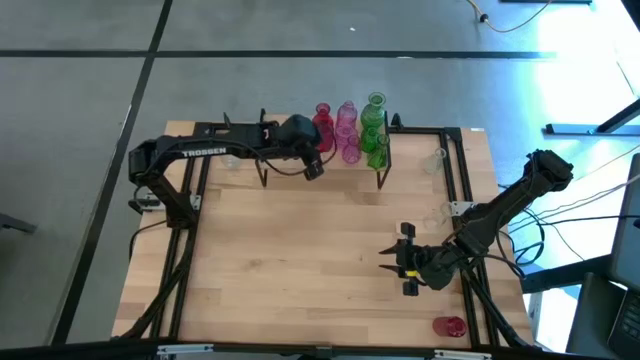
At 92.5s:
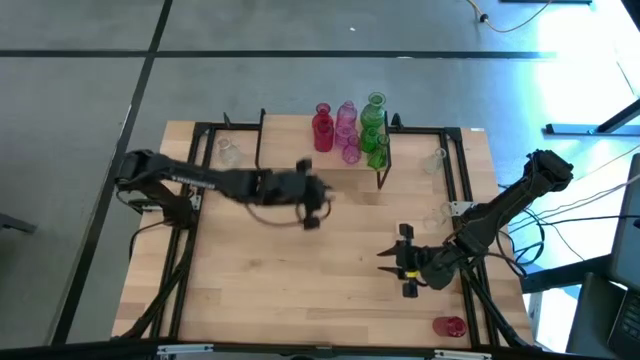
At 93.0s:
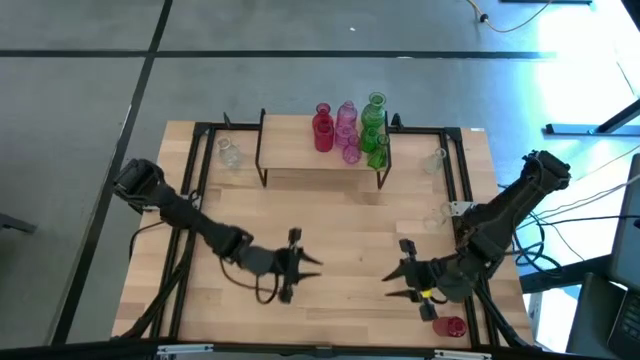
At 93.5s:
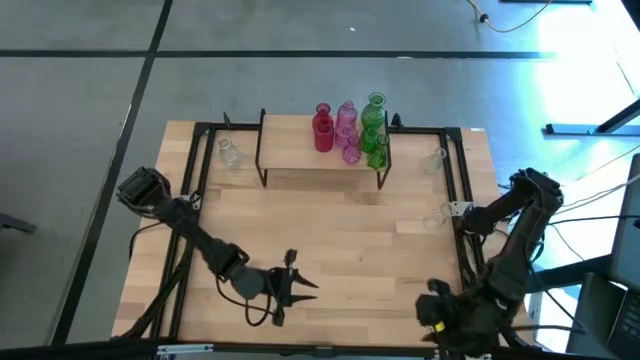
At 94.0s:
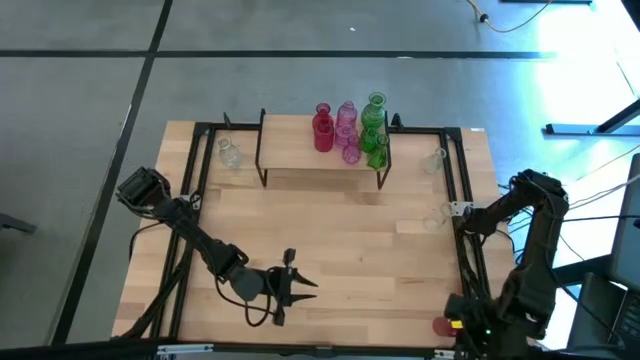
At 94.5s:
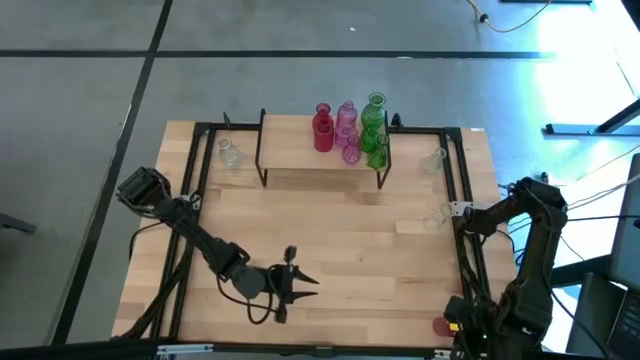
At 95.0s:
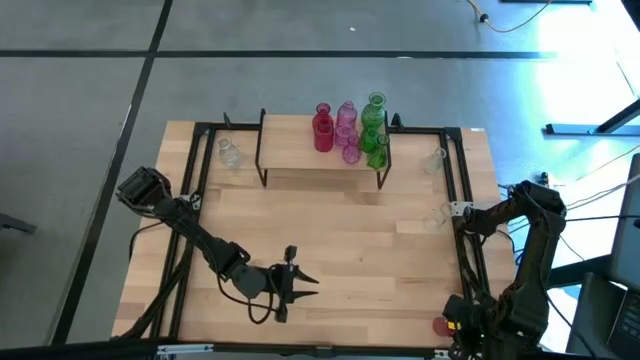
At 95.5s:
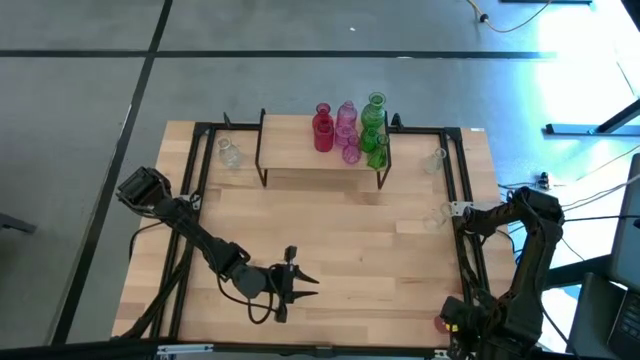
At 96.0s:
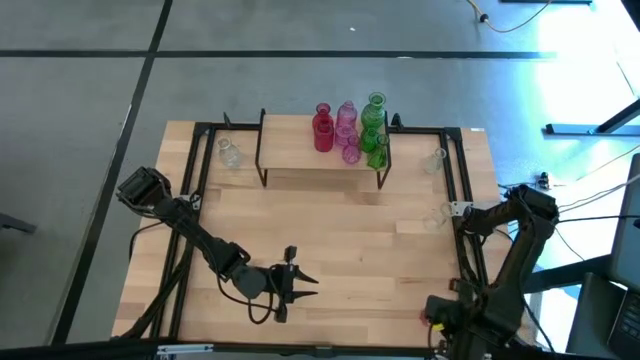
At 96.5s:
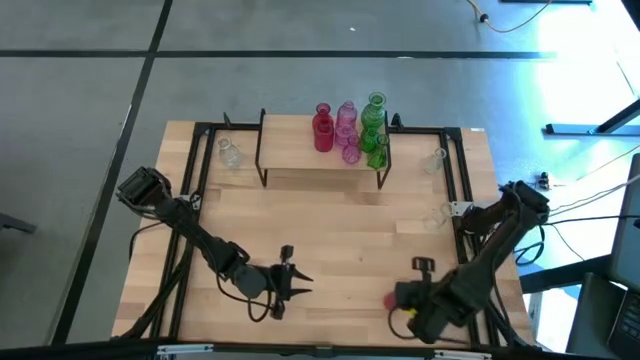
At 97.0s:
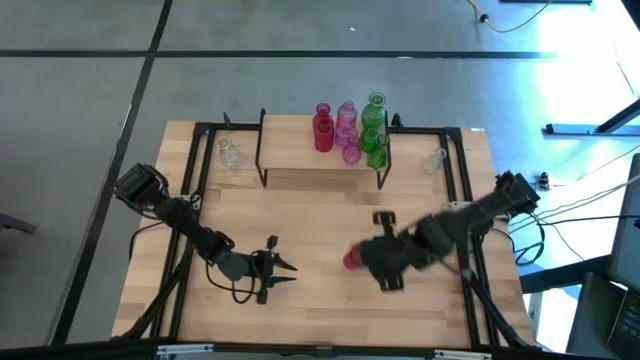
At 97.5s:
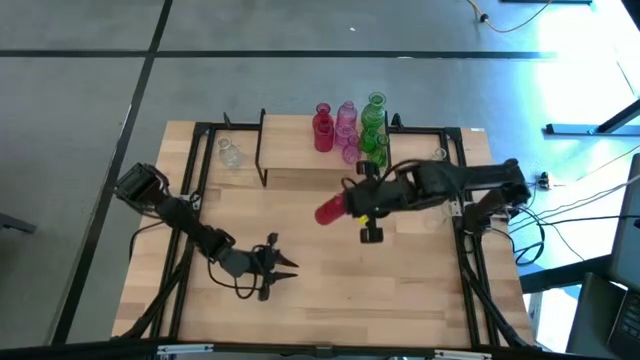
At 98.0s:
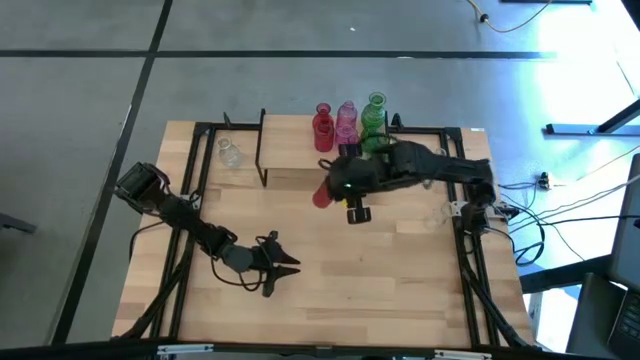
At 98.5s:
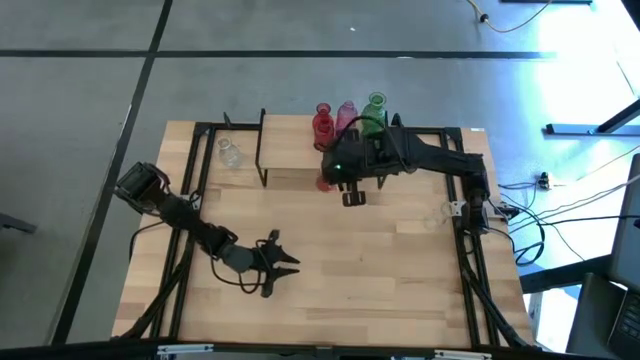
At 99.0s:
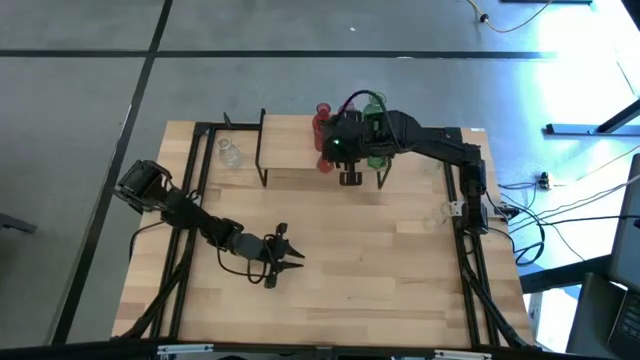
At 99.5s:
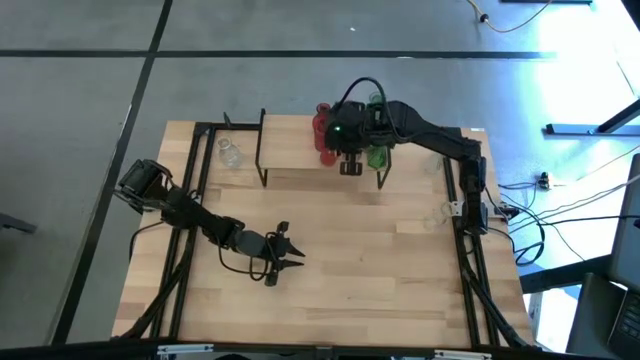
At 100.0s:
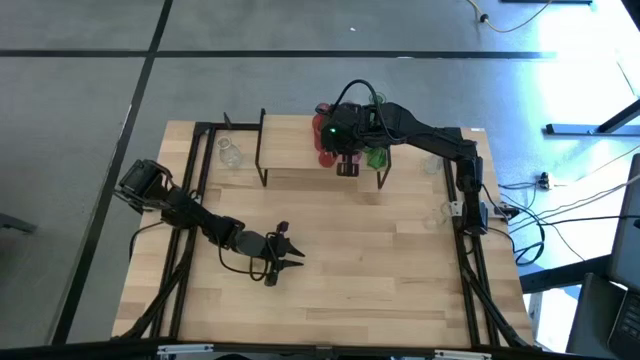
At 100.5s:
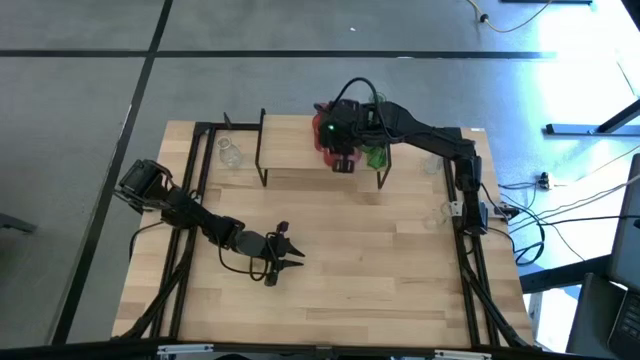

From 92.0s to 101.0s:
Task: sort vases onto shelf
Put the red vase on the shelf aligned with the other red vases

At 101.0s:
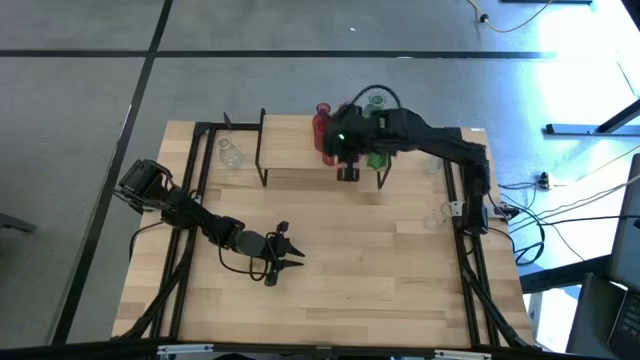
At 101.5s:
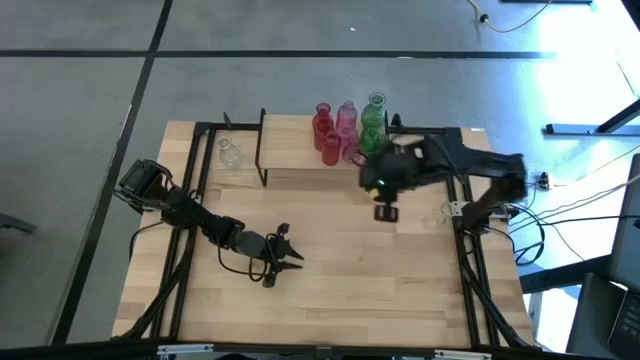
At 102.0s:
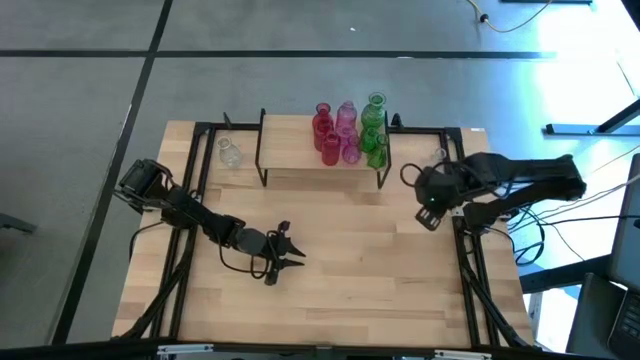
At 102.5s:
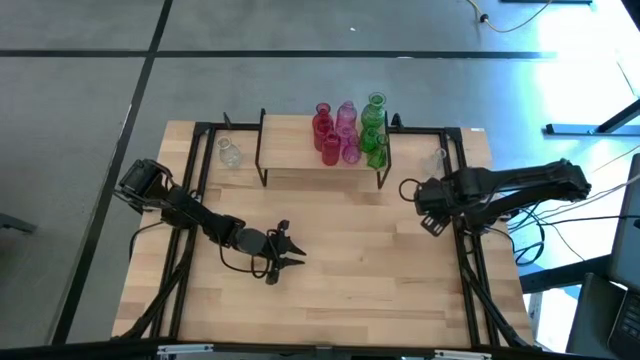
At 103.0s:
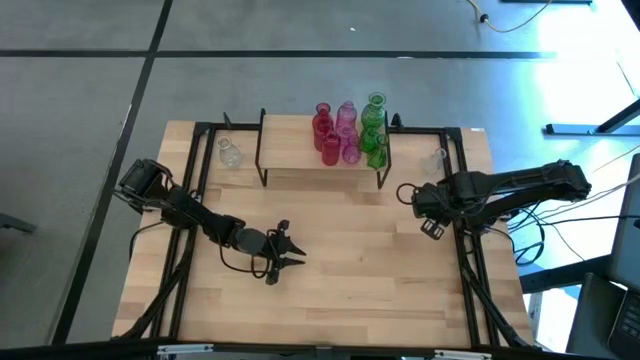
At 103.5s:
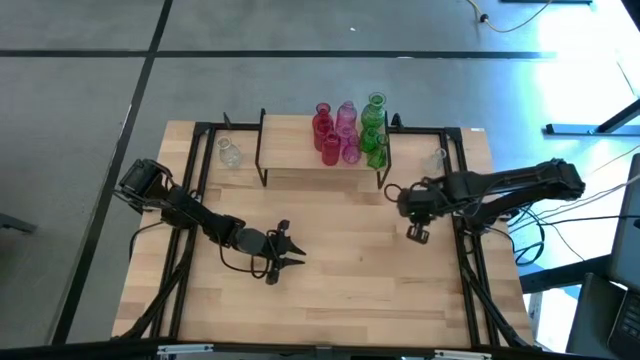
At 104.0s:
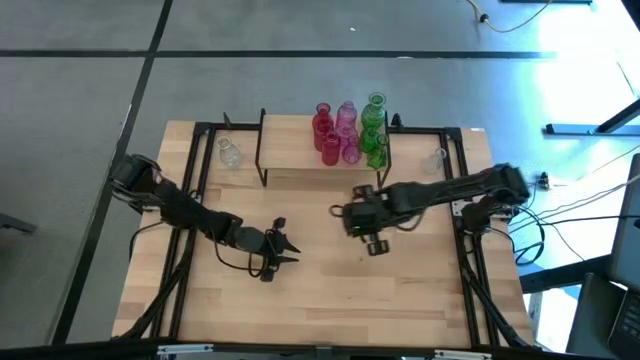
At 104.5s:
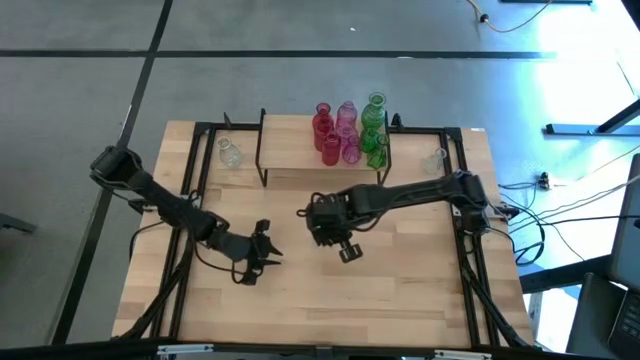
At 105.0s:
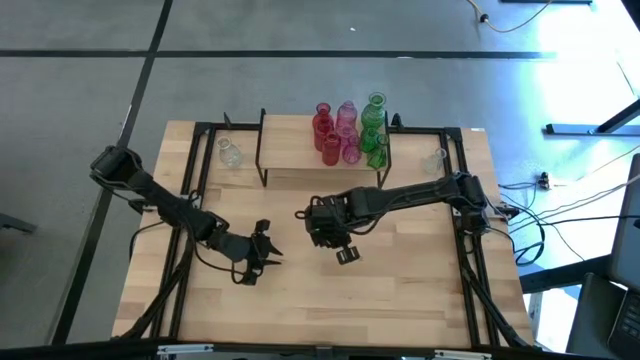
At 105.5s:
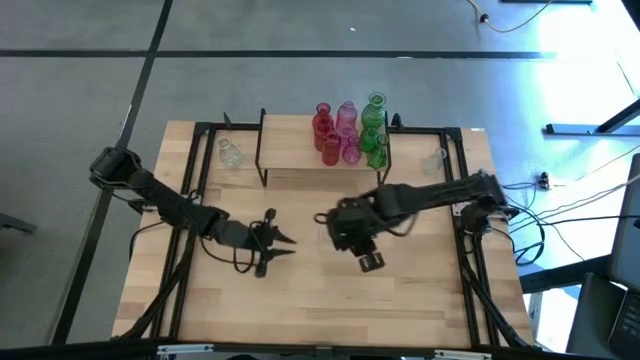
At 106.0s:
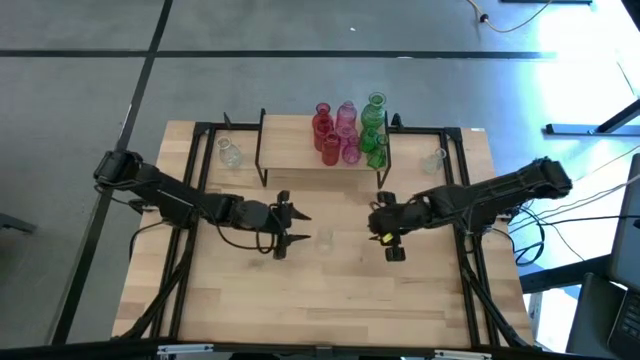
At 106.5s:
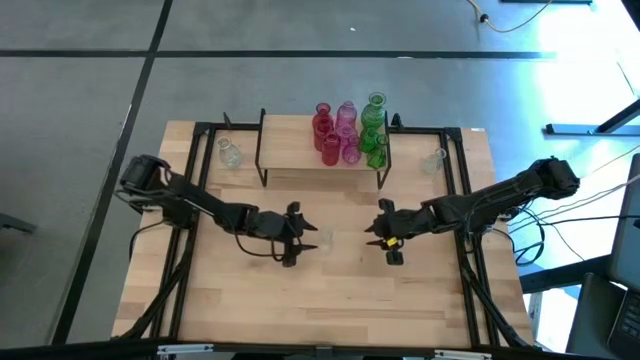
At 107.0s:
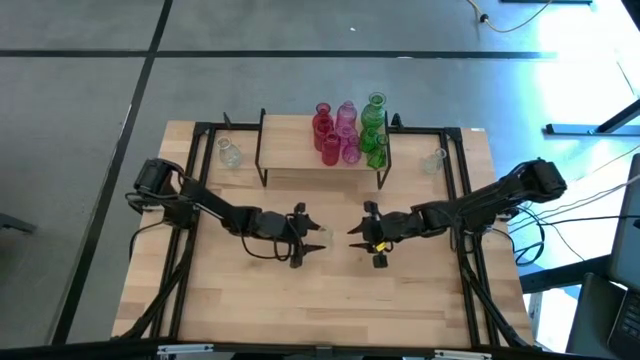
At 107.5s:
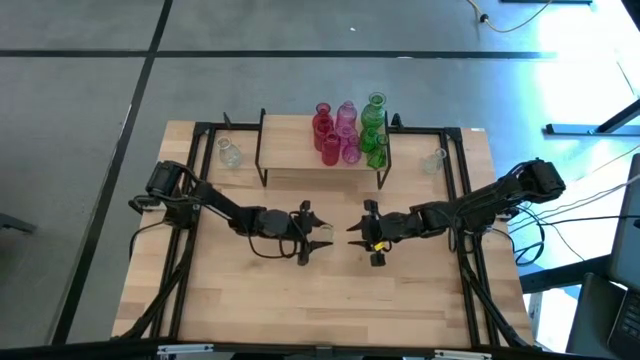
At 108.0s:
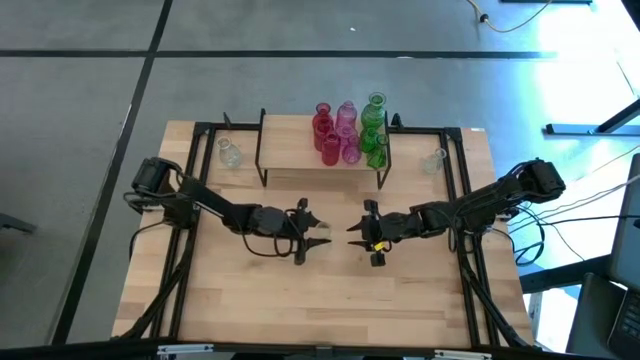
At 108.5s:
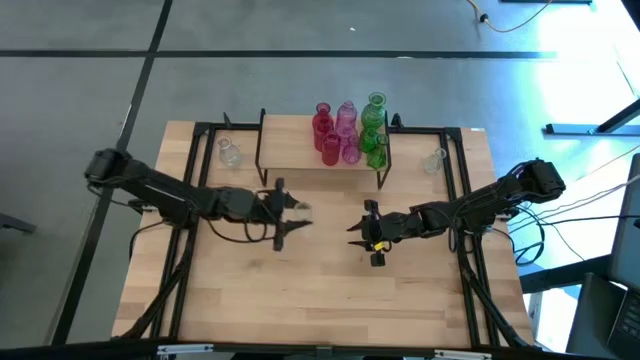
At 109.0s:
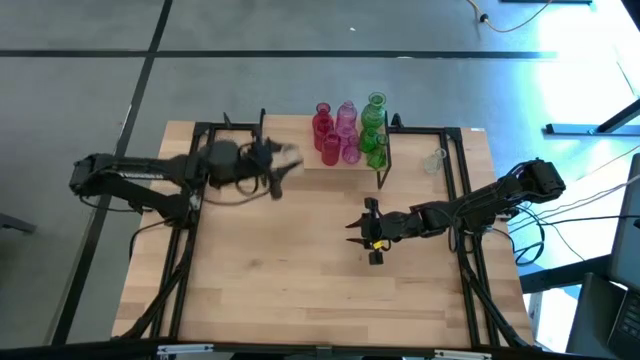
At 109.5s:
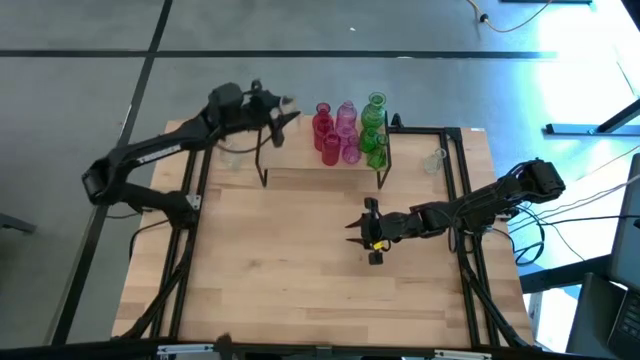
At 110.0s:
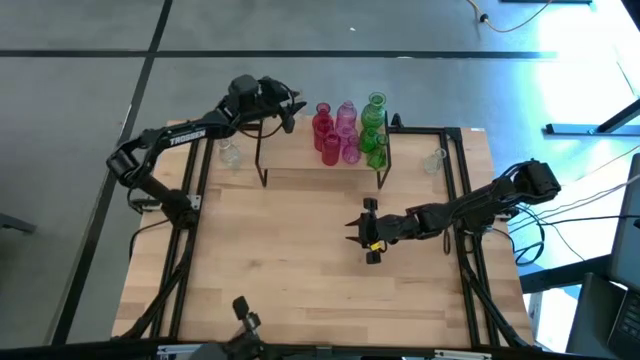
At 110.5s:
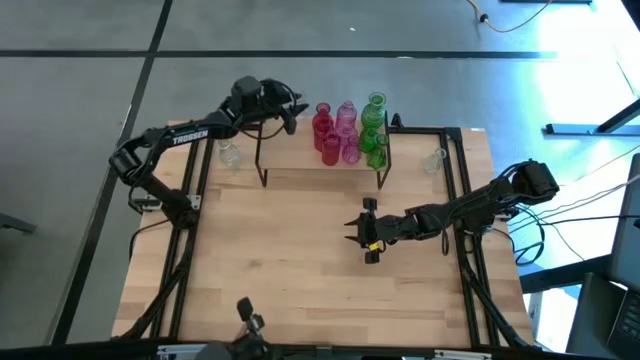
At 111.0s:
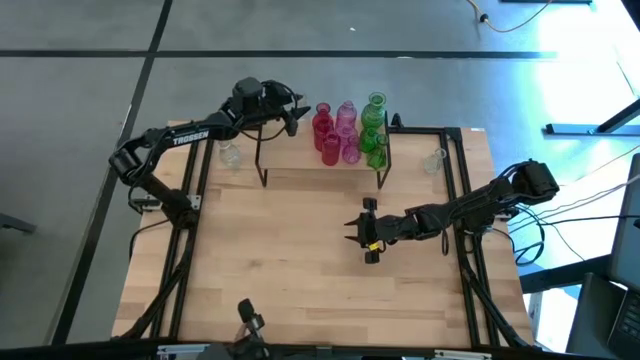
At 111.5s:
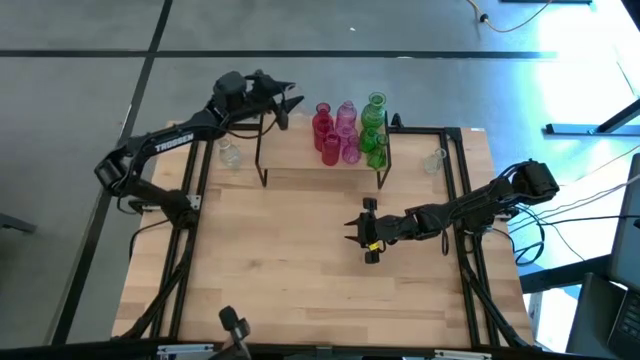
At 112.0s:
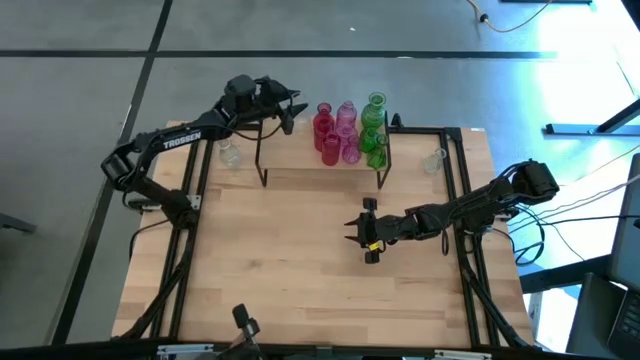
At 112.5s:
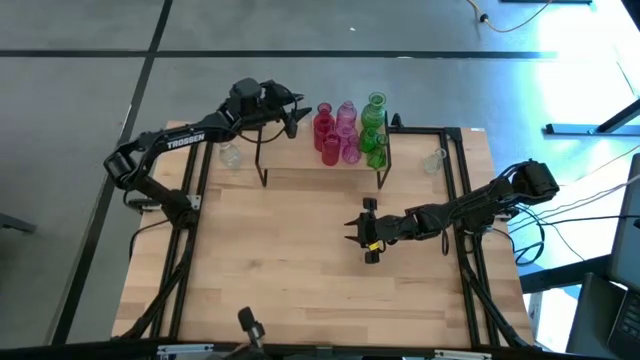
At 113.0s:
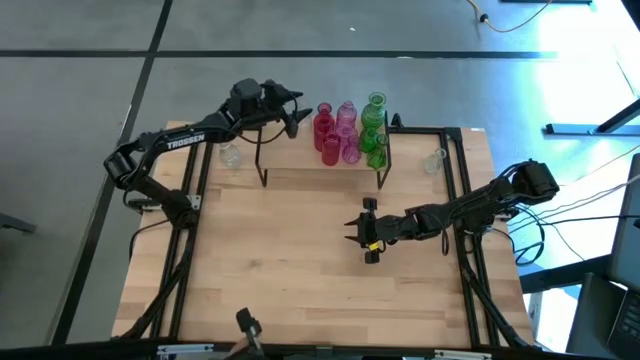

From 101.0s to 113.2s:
Put the bottom transparent vase on the shelf

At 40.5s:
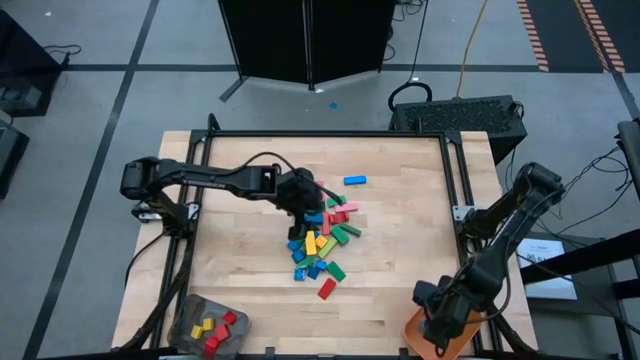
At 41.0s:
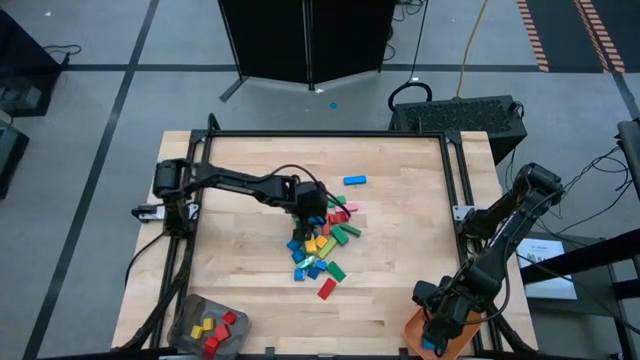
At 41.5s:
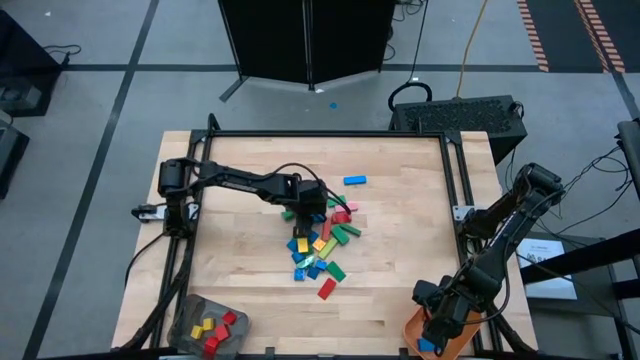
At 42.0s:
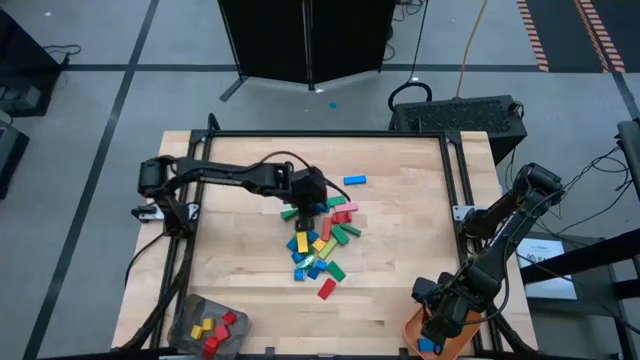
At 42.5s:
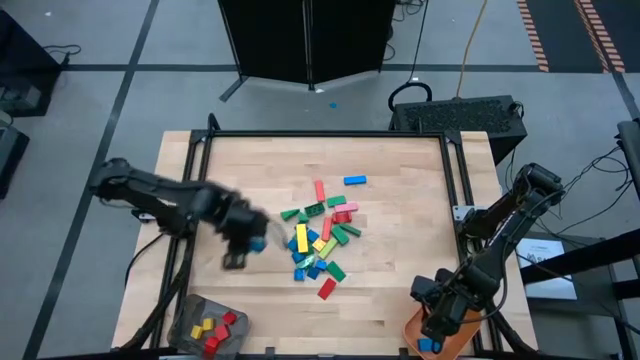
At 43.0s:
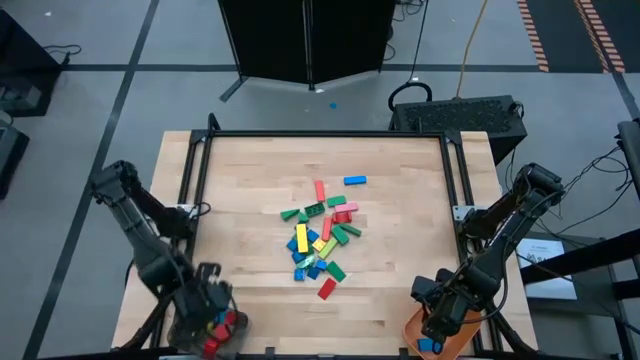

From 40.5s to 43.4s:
Task: Sort blocks by size
Put the blue rectangular block into the orange bin
